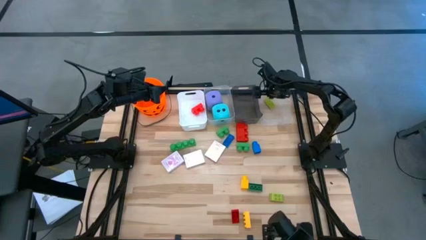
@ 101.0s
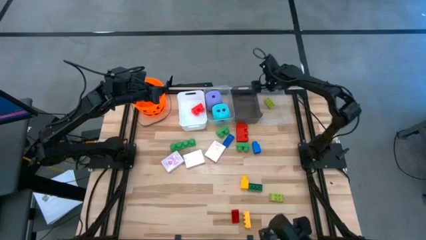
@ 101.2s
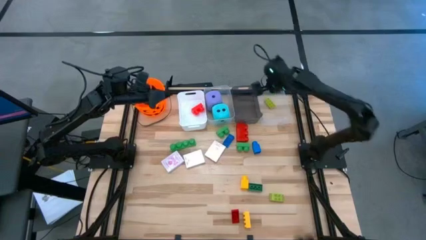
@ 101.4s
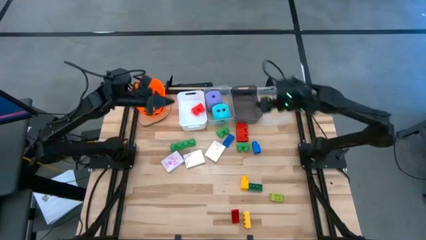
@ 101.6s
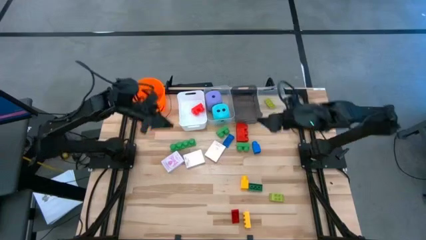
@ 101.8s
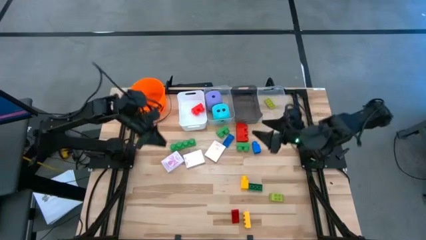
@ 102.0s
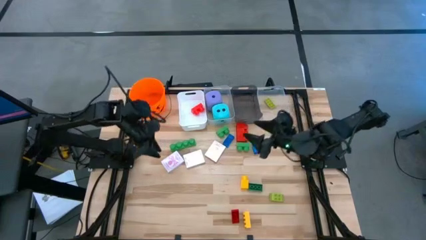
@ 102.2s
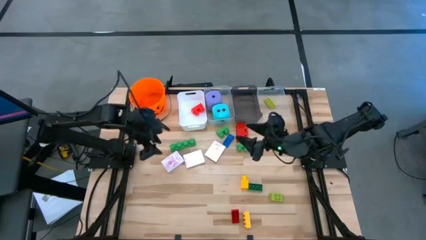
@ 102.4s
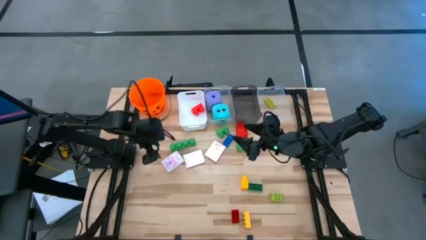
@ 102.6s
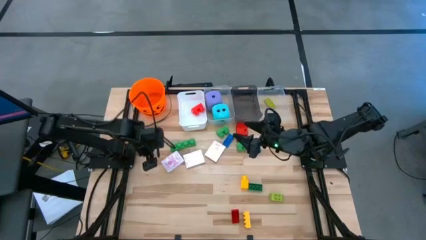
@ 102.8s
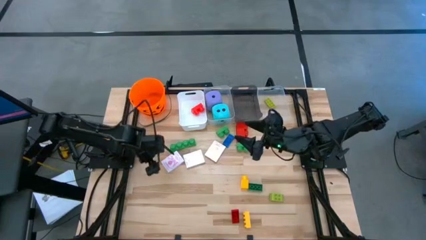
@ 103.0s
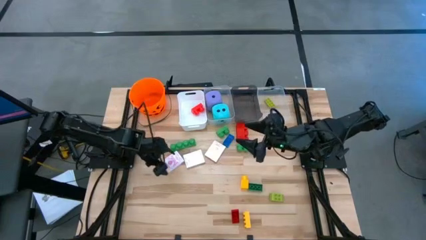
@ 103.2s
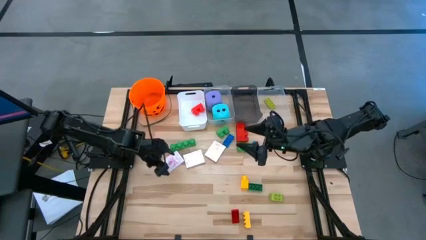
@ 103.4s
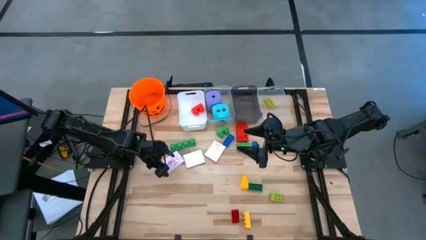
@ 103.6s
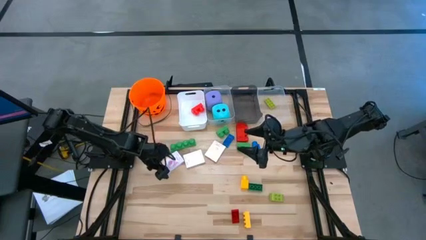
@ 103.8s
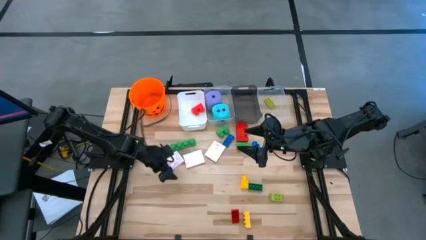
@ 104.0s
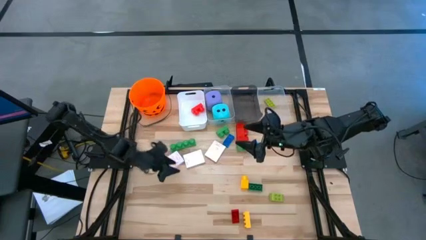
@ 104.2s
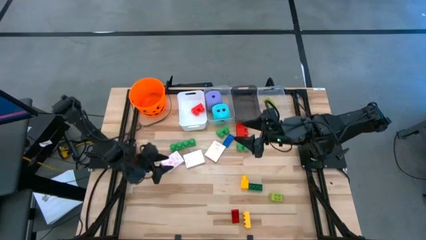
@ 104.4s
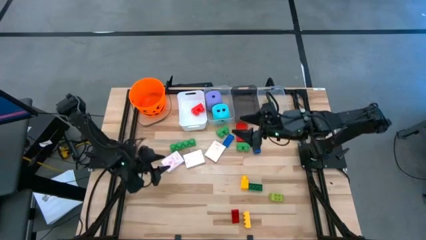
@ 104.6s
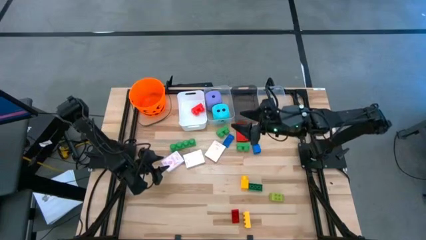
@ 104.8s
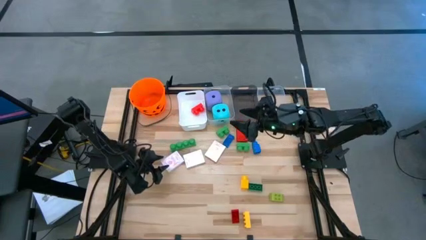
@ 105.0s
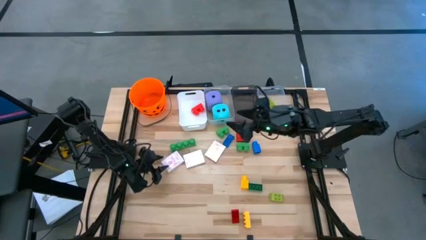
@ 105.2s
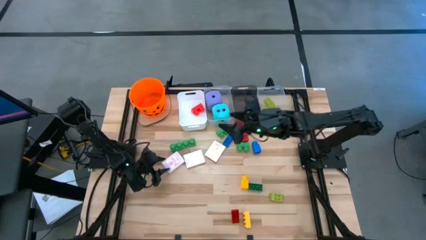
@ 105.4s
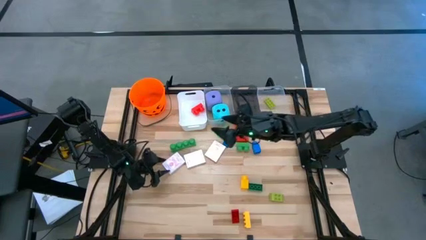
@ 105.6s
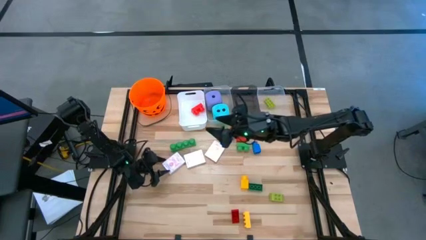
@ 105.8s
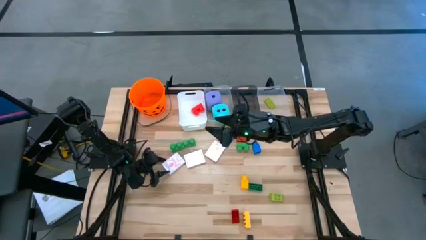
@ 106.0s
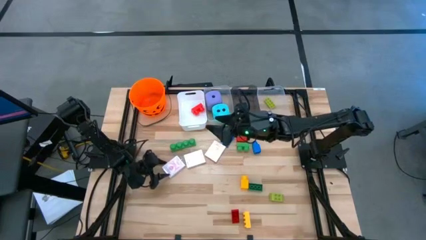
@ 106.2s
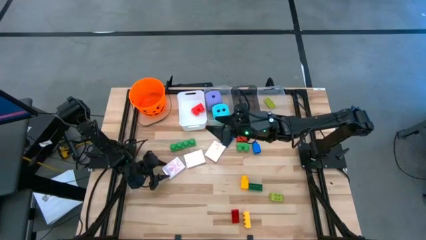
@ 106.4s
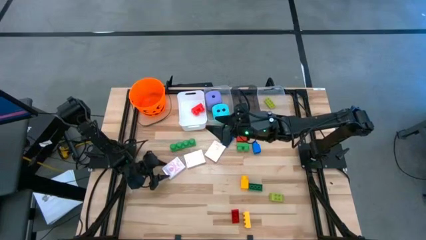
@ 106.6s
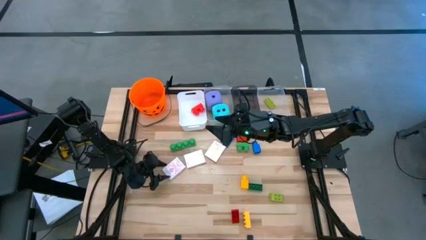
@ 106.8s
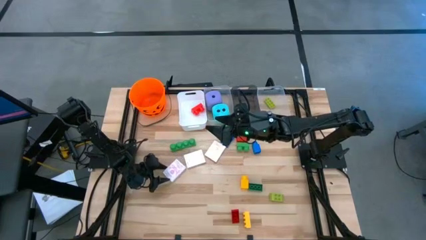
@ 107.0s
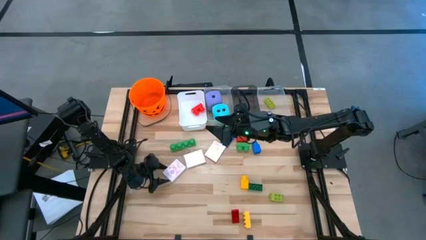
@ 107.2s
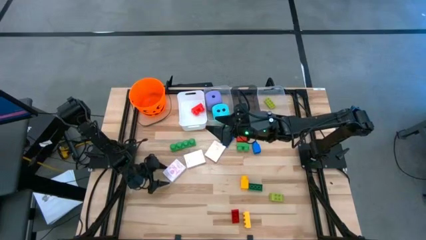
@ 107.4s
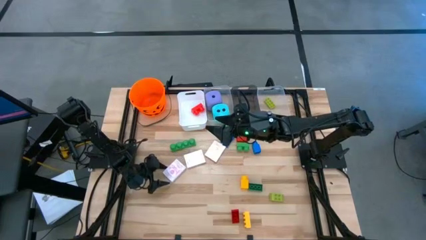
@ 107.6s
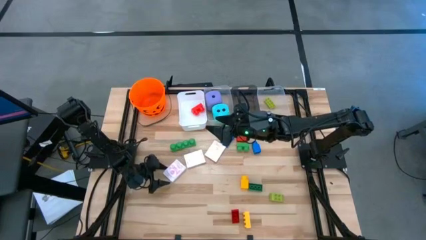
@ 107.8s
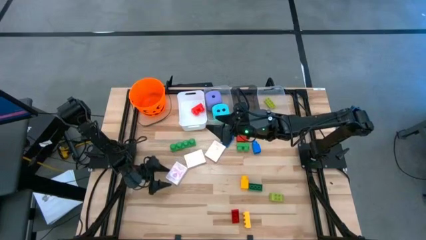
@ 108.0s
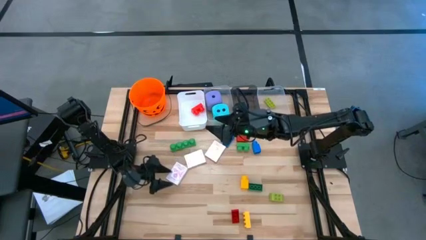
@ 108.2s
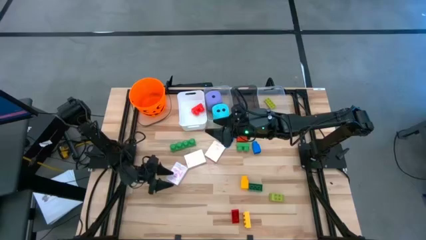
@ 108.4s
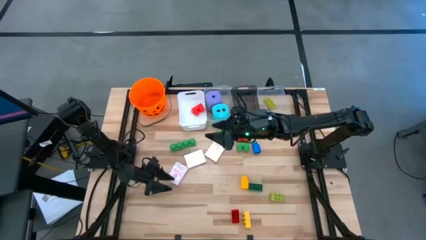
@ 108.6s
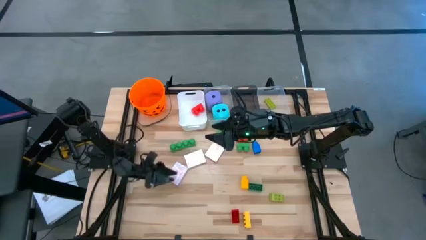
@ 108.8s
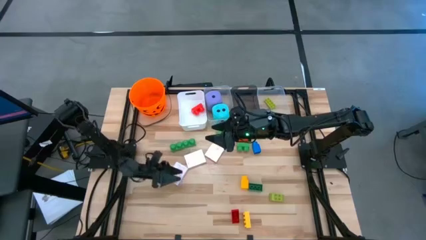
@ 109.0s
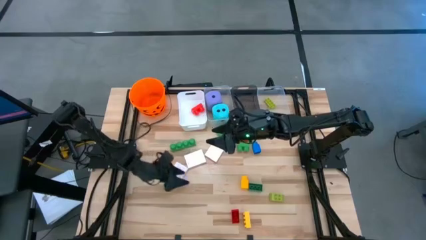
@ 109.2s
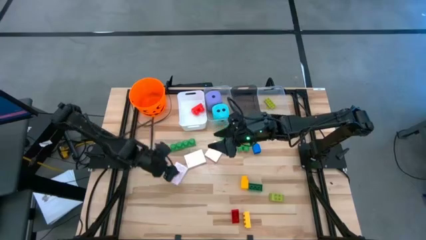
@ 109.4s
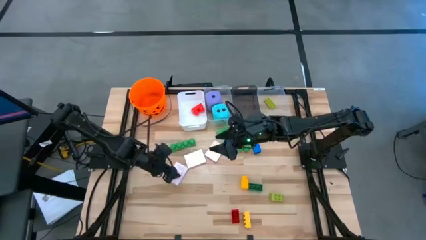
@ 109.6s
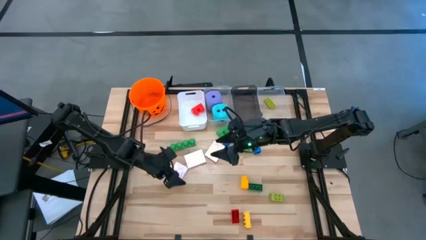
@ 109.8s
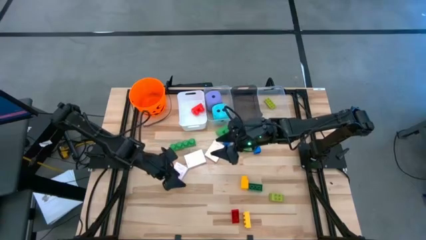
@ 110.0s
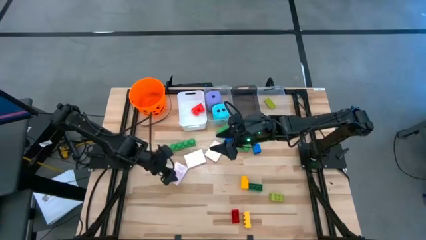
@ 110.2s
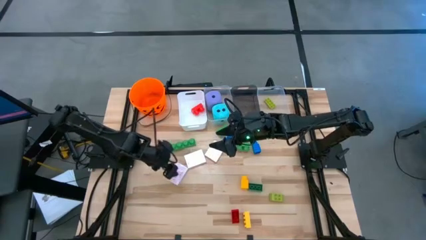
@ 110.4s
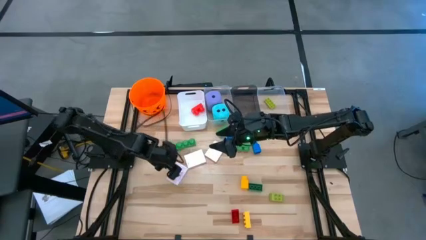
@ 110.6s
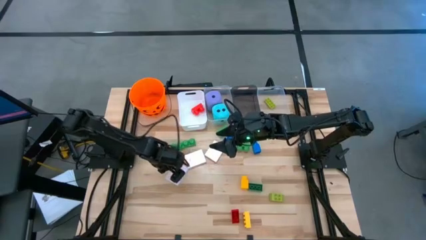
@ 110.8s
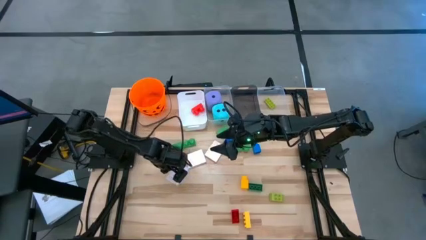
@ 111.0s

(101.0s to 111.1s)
Task: Pick & Place Toys
Put the pink deck of cards into the black bin

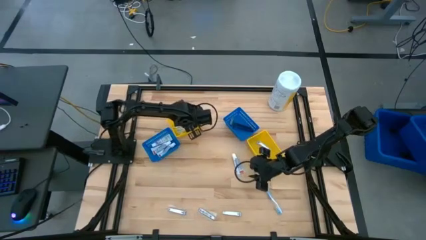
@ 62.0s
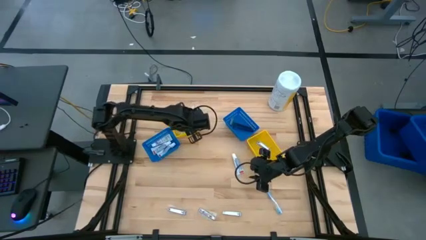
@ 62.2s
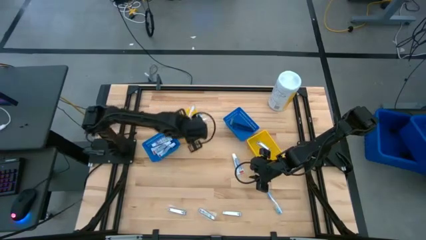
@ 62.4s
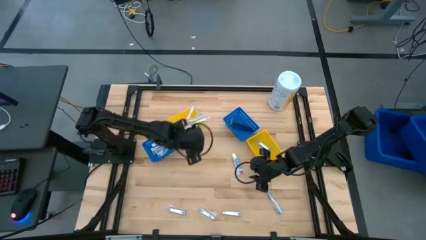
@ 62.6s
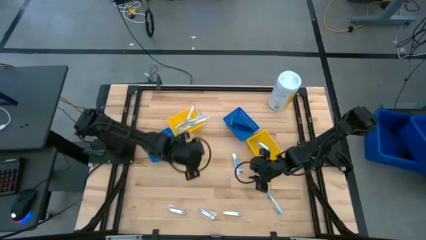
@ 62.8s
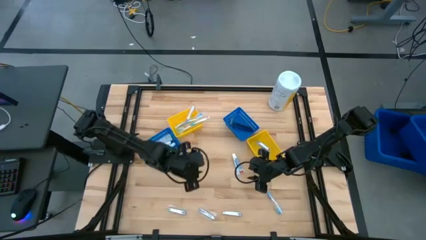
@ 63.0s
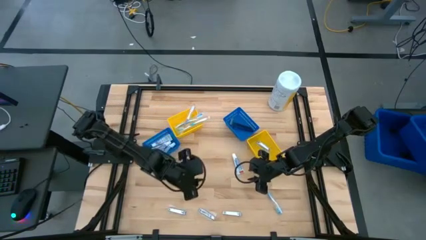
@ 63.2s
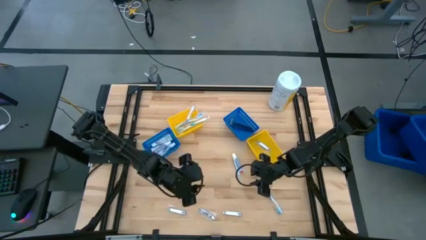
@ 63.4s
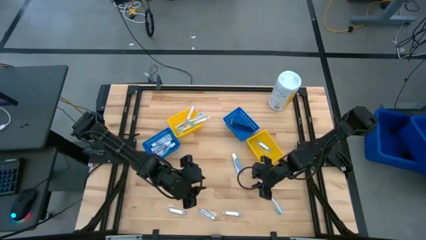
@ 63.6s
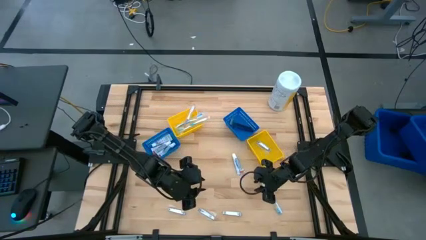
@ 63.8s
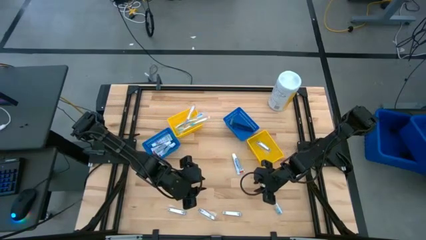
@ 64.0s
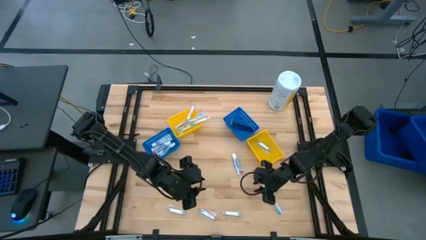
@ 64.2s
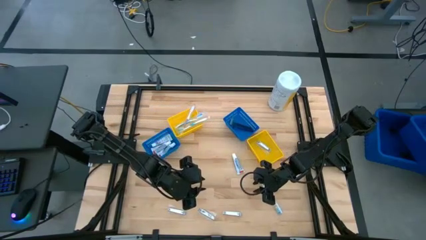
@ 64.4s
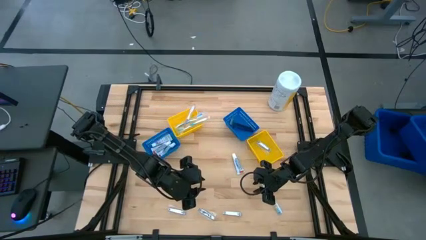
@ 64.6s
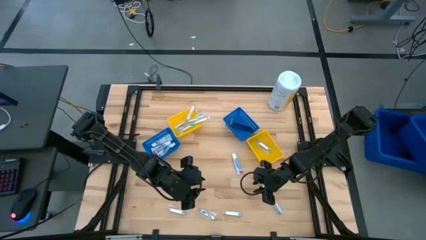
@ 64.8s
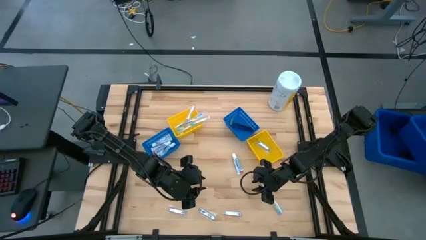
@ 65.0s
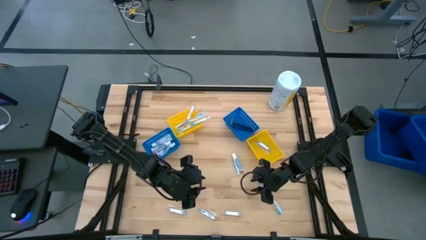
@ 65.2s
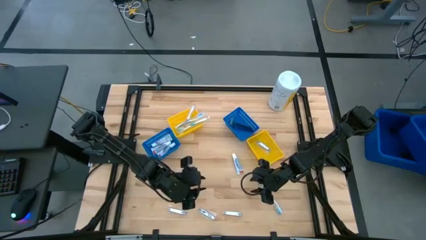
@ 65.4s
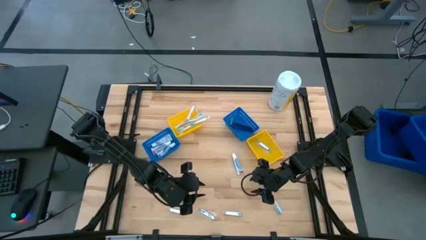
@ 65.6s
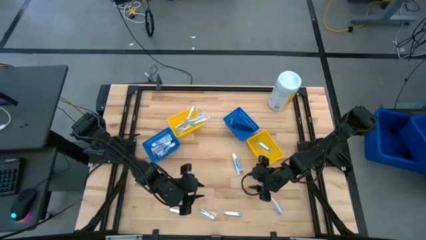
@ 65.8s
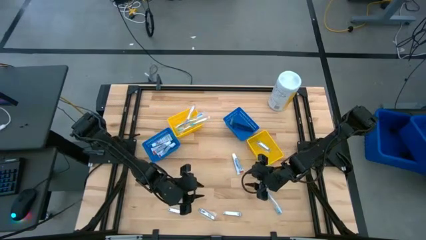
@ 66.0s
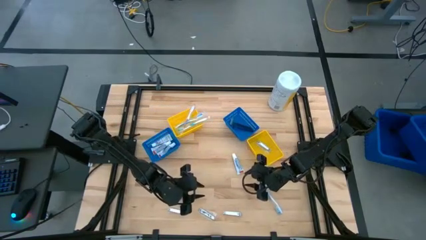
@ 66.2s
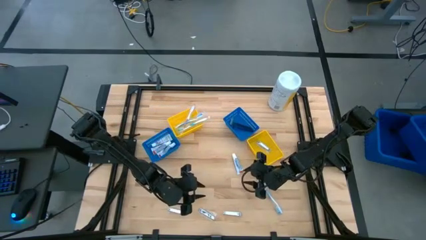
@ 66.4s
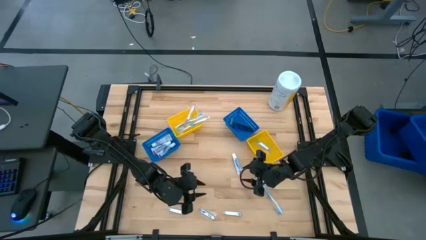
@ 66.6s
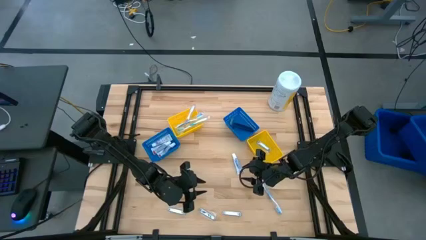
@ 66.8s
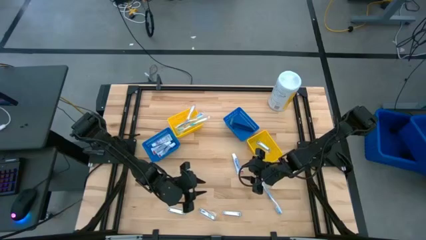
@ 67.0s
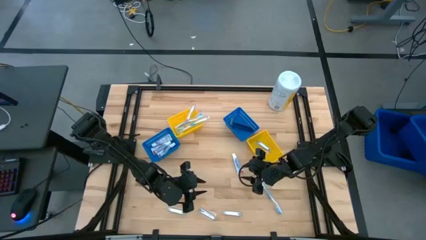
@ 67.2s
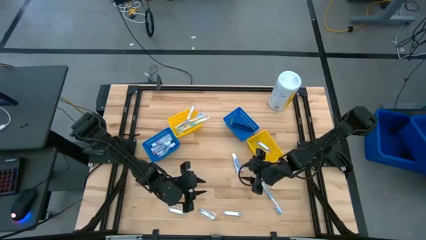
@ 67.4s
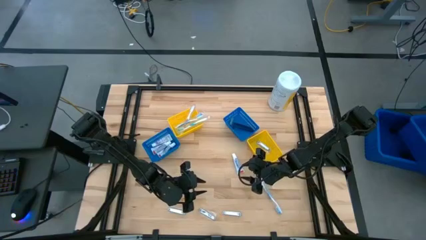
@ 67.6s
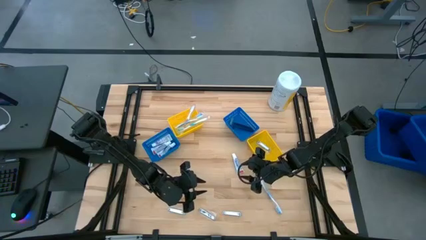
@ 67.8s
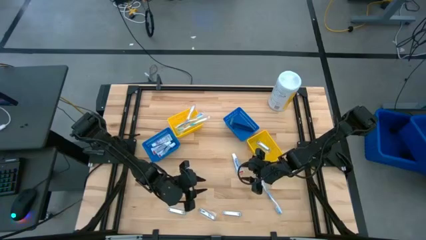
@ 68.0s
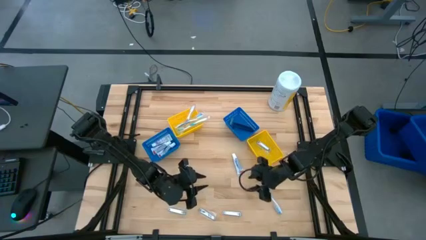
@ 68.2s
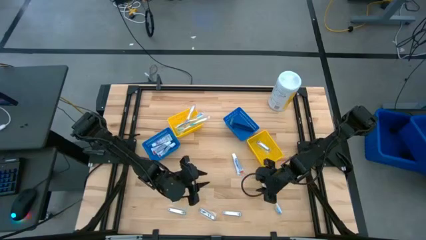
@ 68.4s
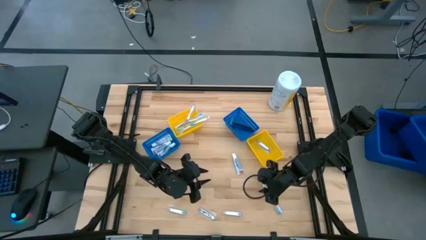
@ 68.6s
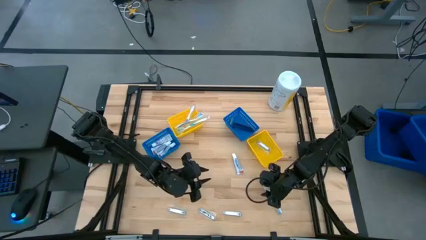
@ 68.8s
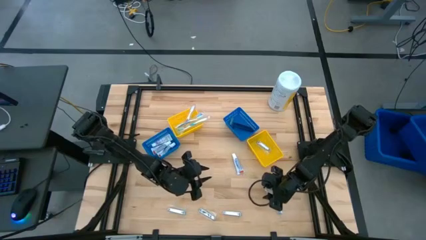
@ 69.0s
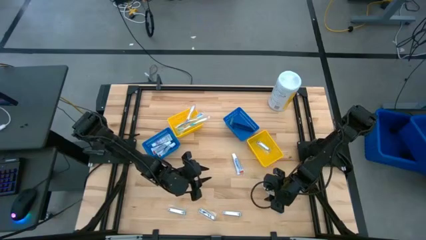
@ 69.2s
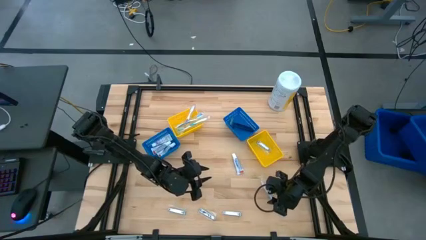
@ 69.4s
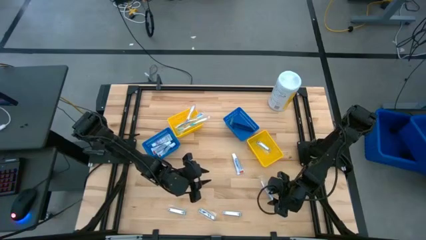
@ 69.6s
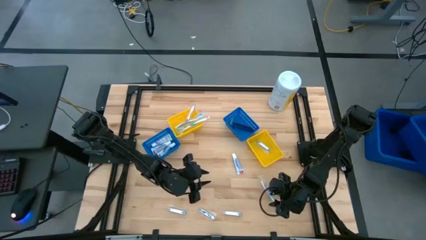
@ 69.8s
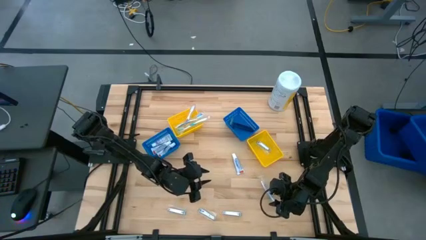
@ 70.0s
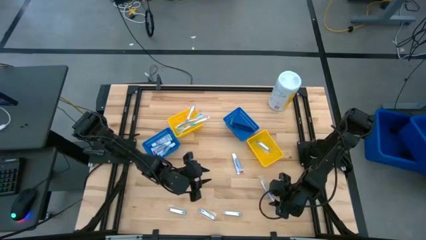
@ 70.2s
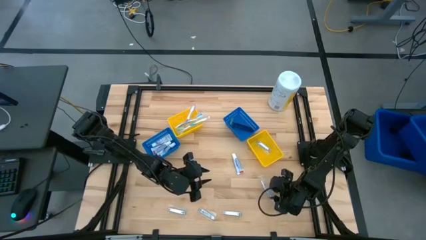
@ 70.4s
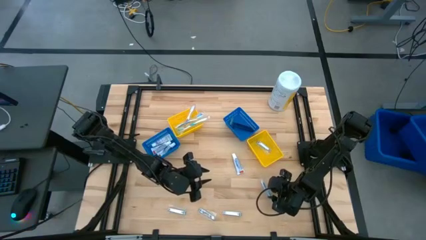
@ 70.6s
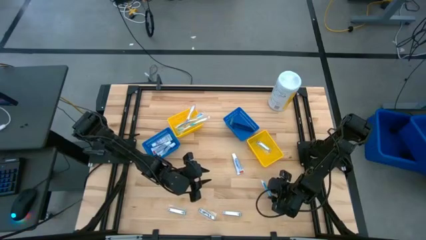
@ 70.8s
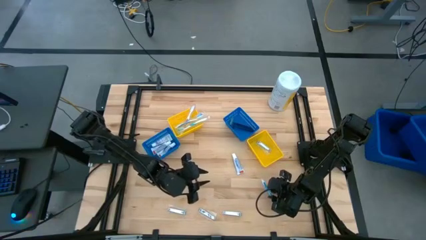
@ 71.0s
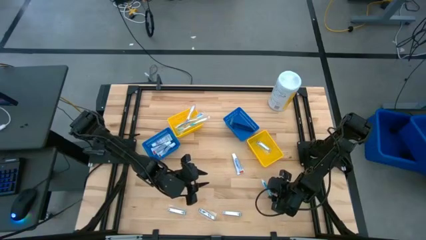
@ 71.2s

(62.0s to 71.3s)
Task: Pick & Place Travel size toiletries
Put the blue toothbrush into the left yellow bin
